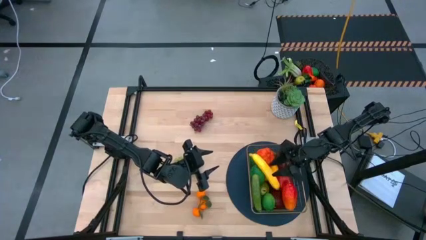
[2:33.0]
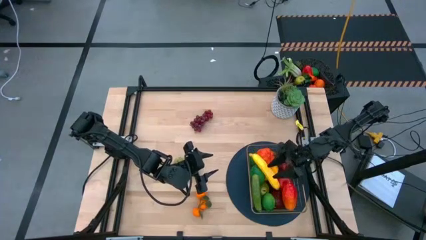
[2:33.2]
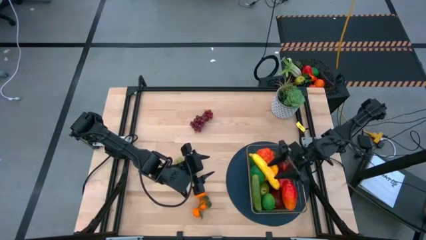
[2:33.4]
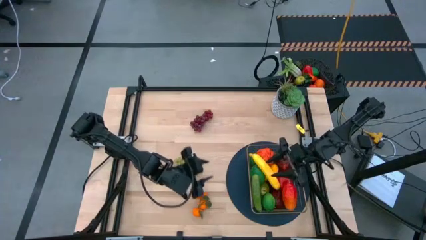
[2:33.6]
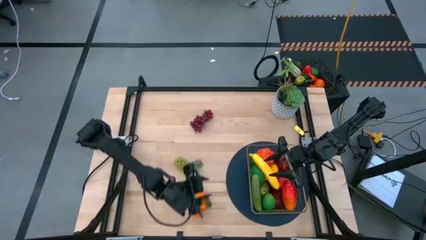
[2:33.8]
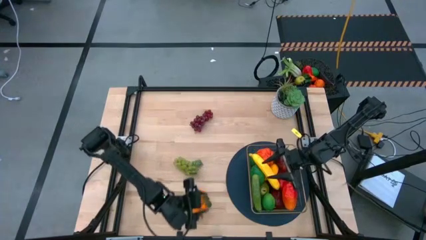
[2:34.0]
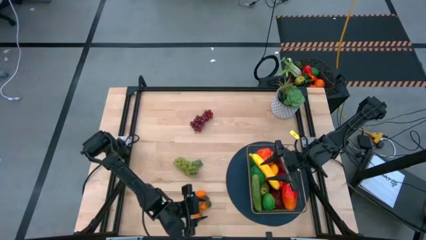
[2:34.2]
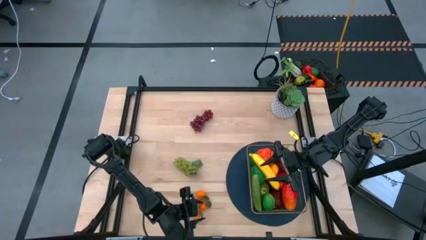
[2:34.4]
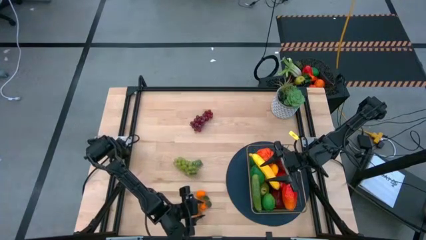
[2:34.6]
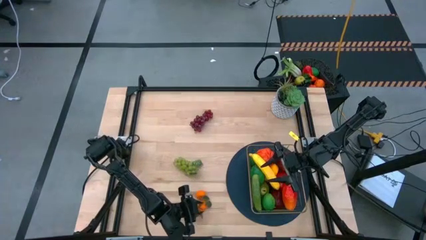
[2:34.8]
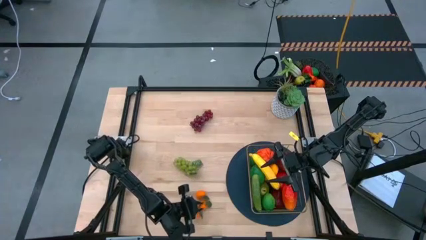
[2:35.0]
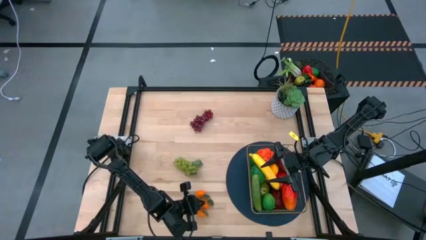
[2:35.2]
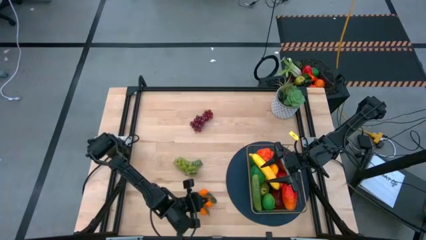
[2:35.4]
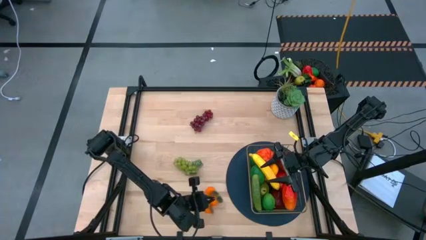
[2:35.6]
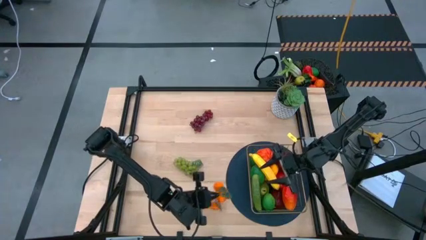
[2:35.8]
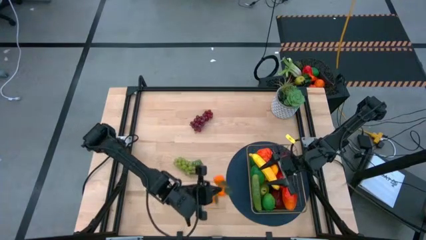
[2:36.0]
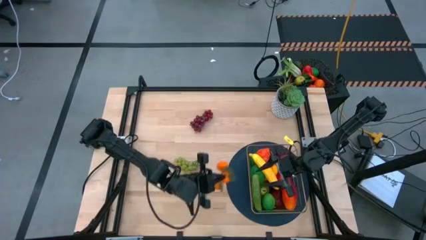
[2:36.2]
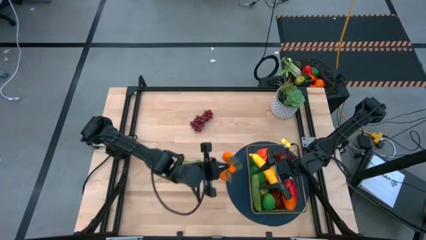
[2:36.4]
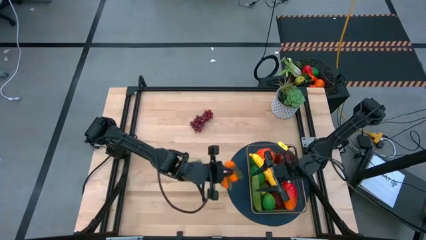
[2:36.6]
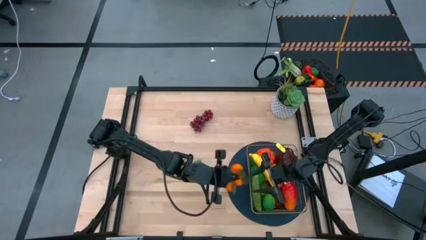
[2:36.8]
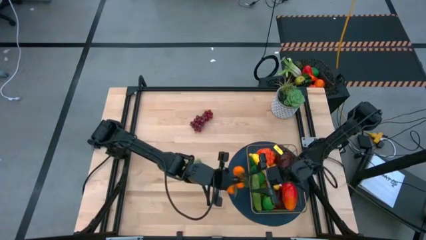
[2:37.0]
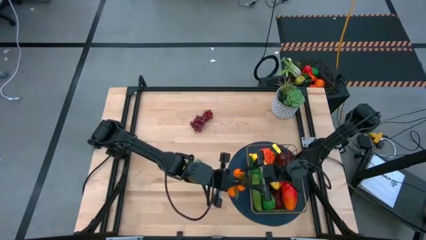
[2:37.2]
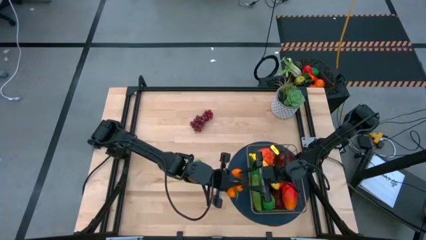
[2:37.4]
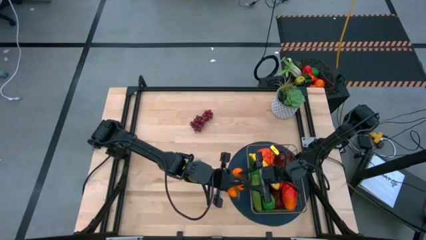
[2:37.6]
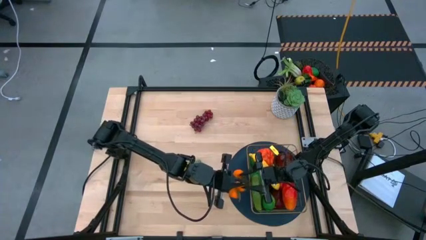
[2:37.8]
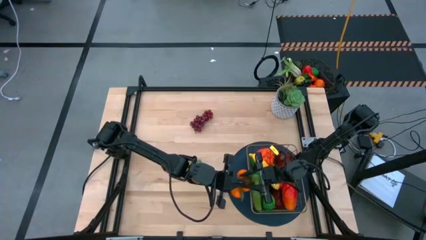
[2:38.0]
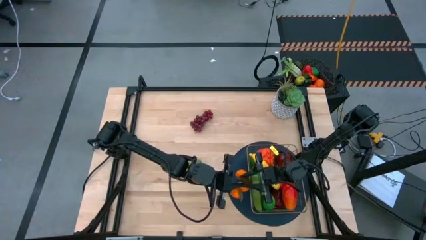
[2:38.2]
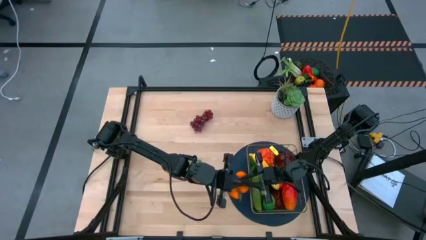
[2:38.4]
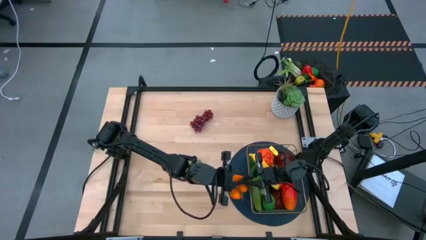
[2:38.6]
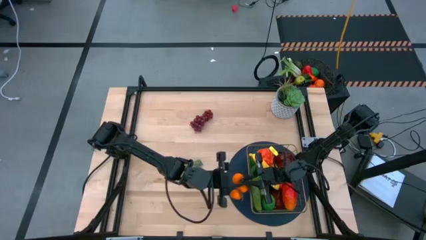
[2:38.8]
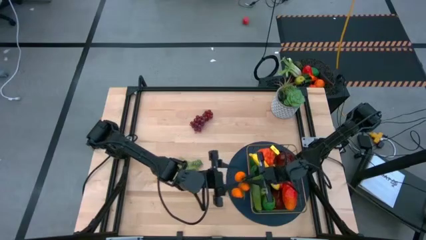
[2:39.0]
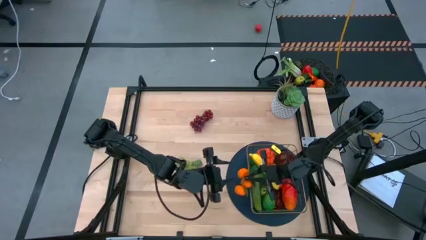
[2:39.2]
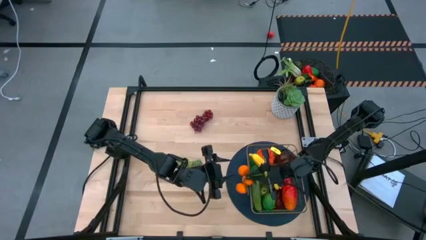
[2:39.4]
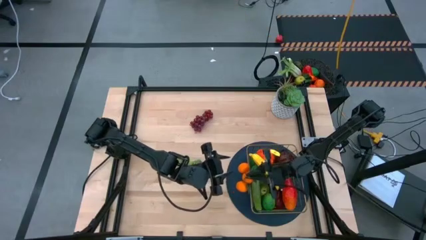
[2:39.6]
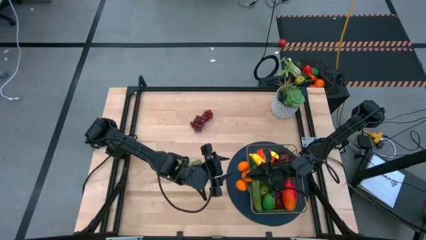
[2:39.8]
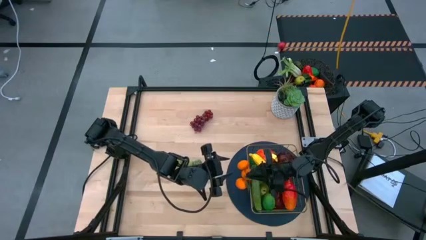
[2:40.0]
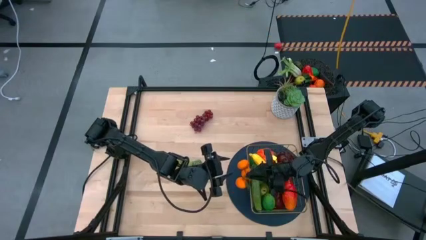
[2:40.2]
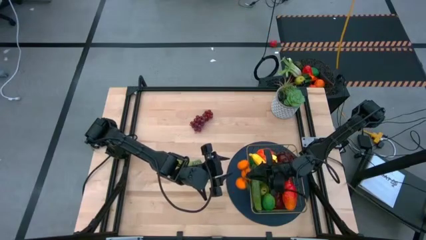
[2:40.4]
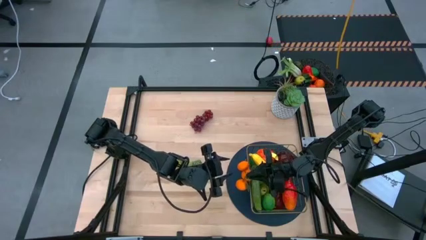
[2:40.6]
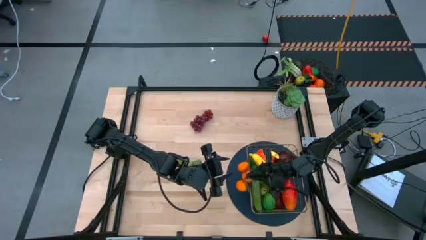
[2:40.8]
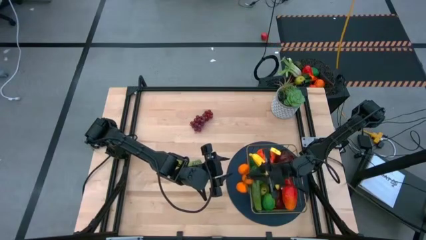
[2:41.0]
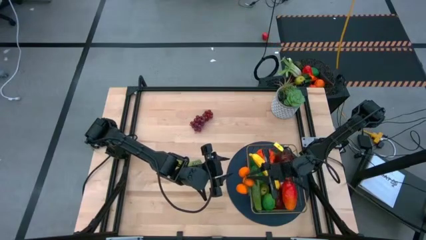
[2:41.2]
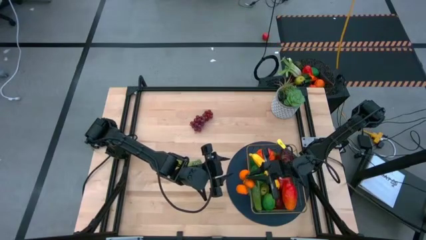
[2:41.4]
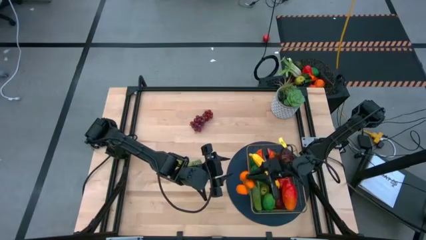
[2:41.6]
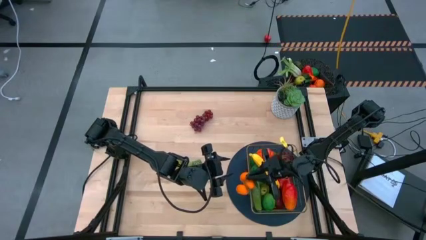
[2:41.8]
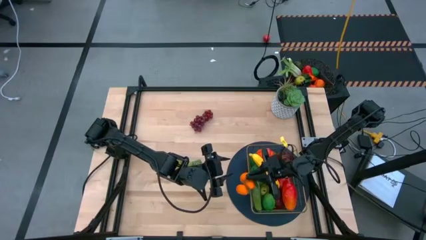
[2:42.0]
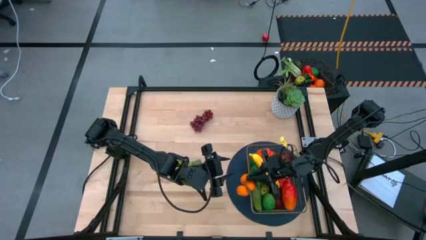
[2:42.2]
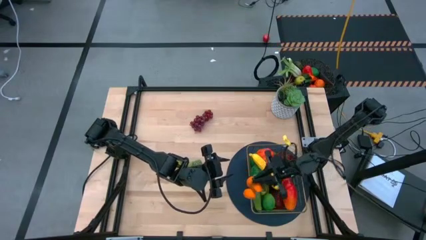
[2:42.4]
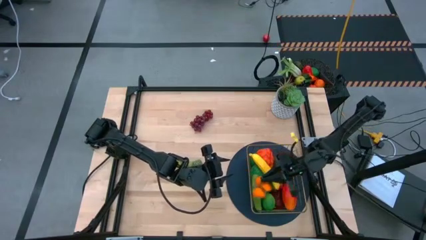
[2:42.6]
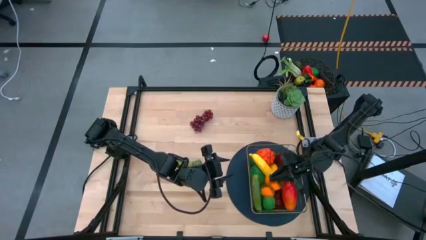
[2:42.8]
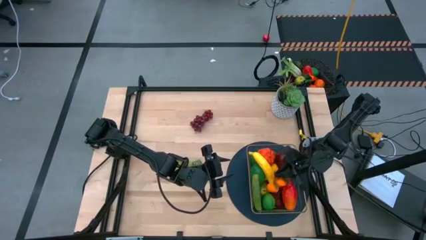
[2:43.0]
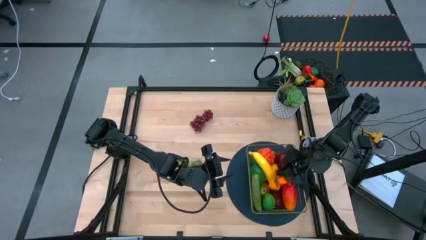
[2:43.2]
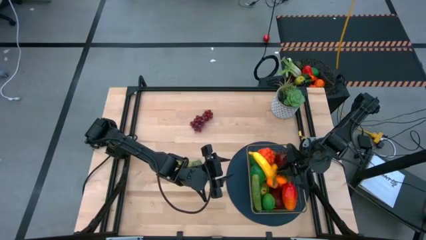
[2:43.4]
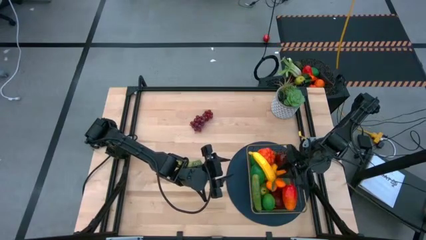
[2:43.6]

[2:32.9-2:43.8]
Task: Build produce basket
Put the bunch of tangerines into the wire basket

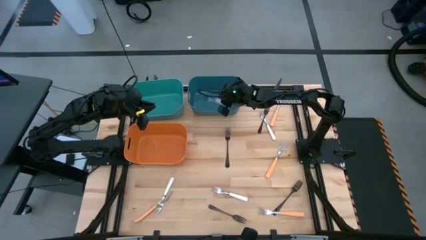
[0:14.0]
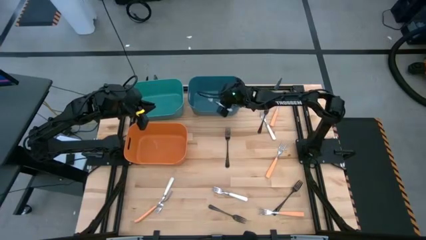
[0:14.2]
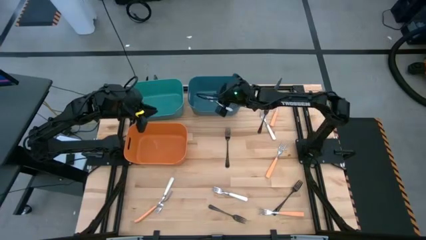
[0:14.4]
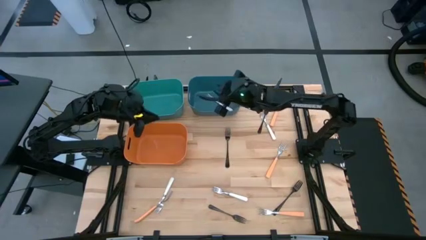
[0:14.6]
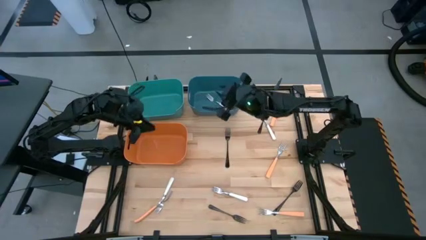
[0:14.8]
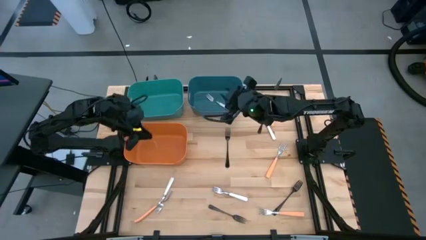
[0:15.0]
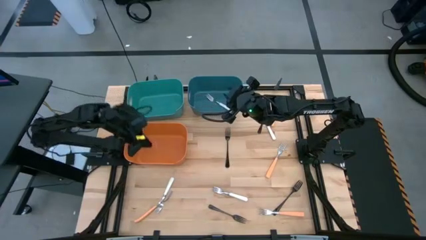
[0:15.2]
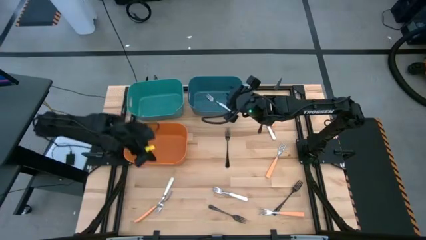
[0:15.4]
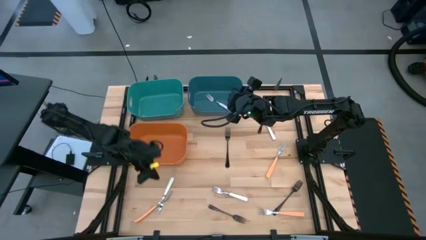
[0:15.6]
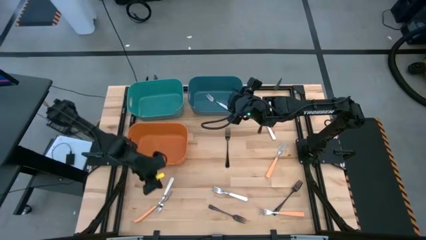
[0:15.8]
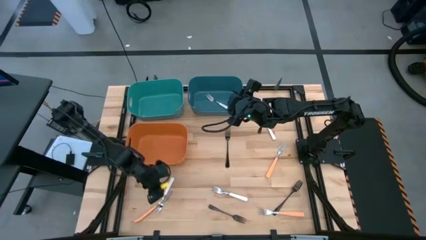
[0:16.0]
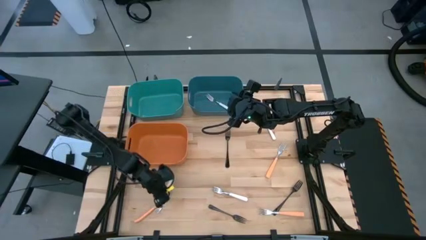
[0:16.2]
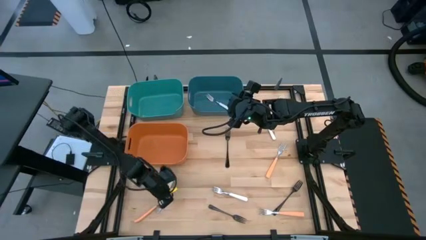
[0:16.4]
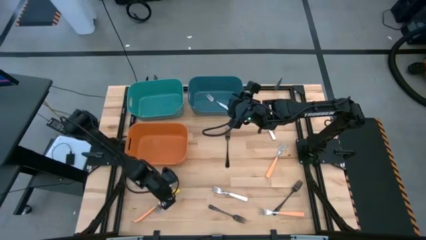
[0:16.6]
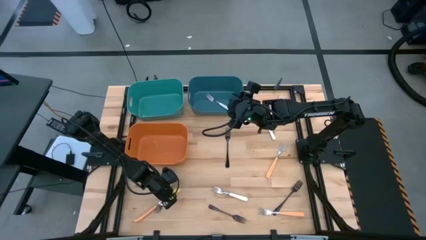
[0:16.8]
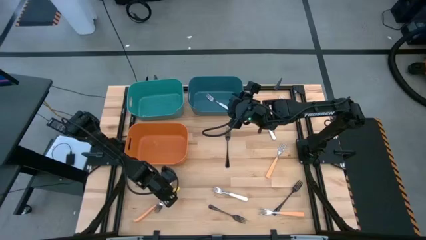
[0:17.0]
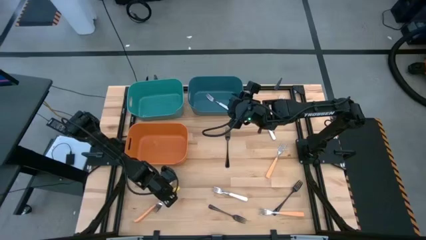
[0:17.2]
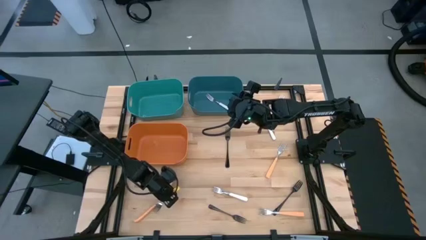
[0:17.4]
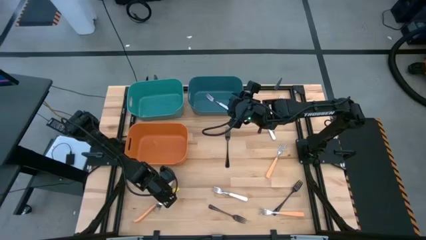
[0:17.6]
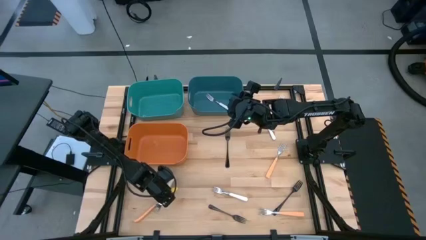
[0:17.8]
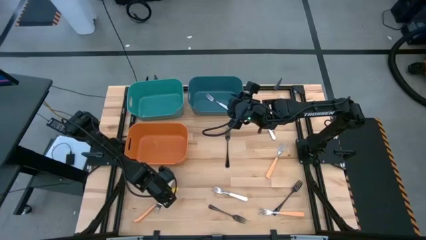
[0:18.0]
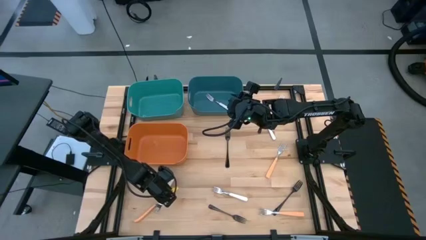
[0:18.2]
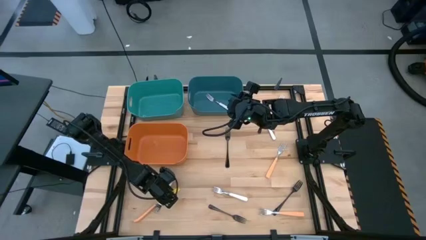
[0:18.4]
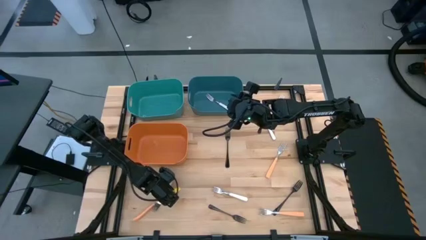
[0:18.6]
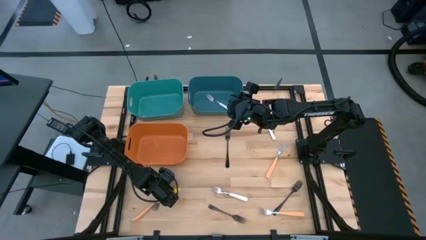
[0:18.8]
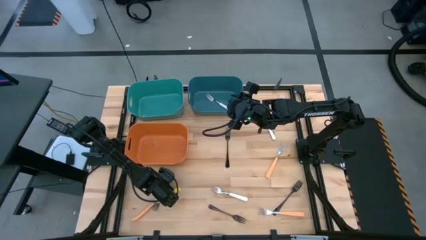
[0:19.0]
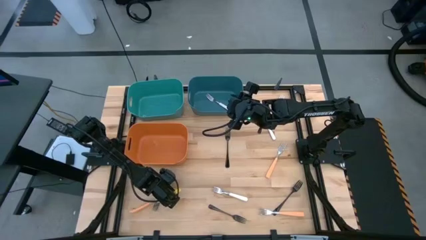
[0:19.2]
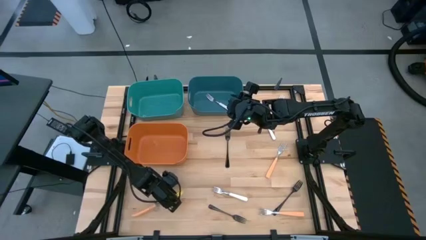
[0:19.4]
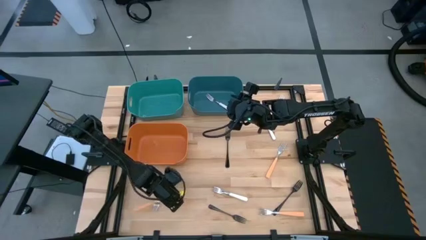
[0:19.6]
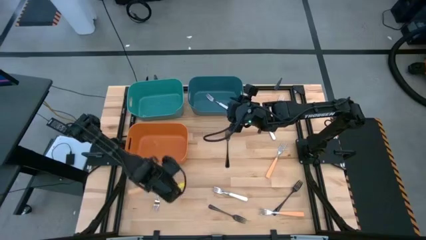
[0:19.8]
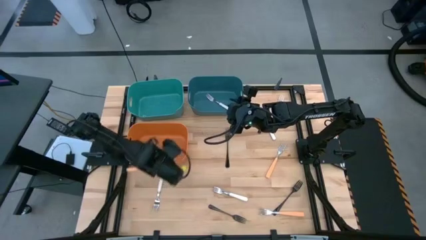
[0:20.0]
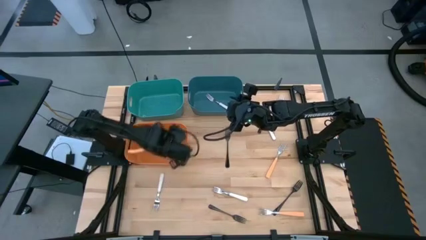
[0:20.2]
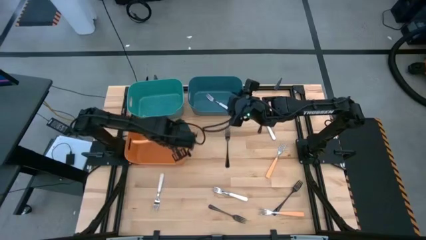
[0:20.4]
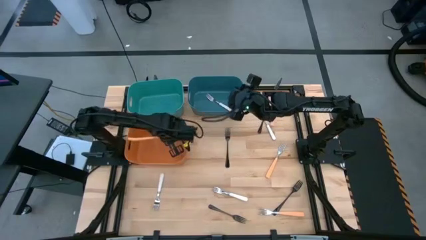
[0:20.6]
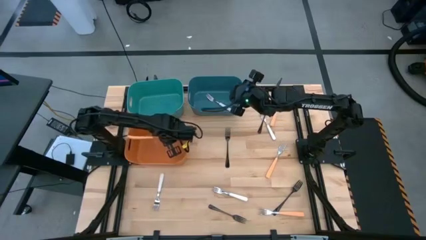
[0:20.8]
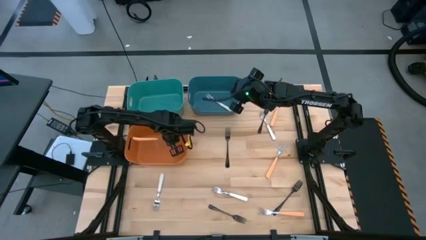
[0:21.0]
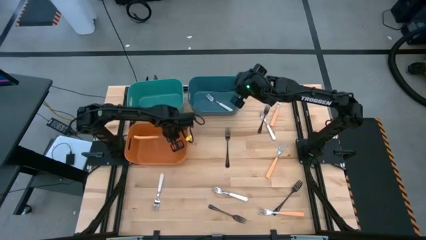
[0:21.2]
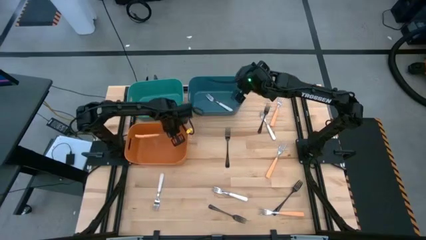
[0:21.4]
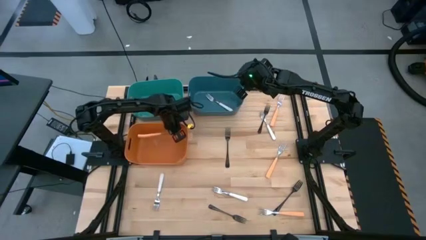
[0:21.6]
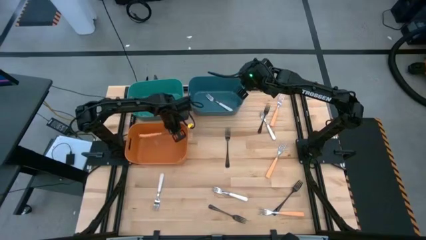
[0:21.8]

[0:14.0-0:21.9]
Task: Sort silverware by color (type)
Put the orange fork into the orange bin
